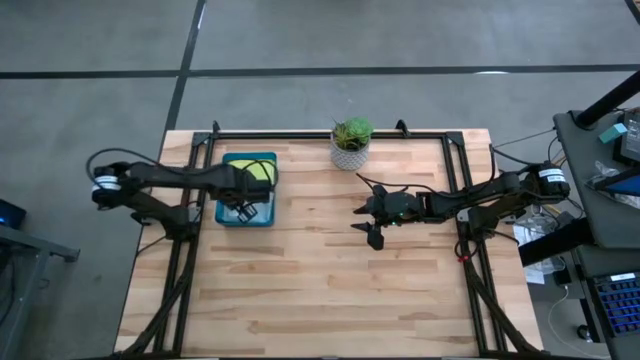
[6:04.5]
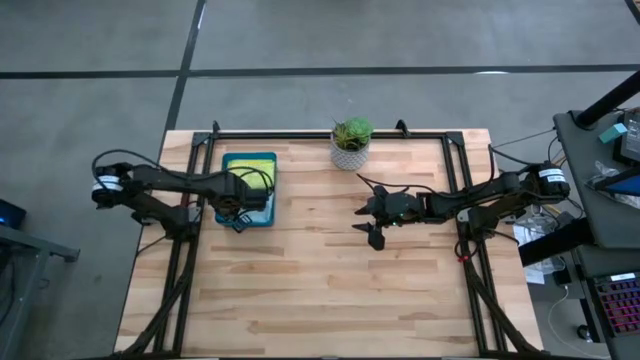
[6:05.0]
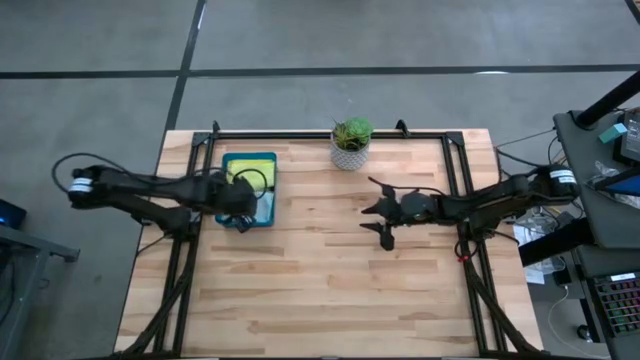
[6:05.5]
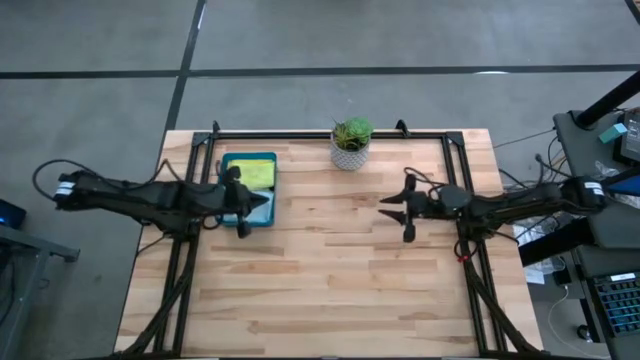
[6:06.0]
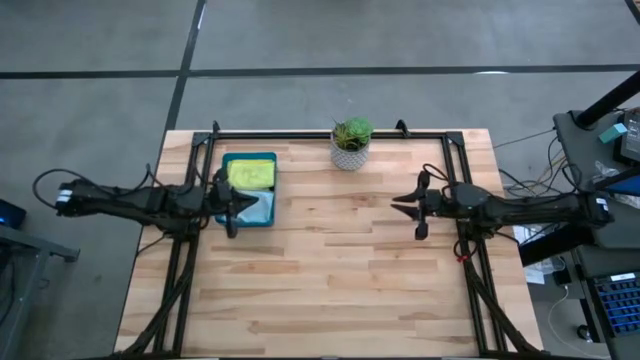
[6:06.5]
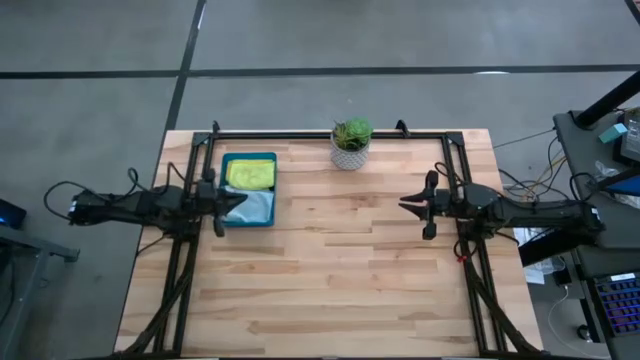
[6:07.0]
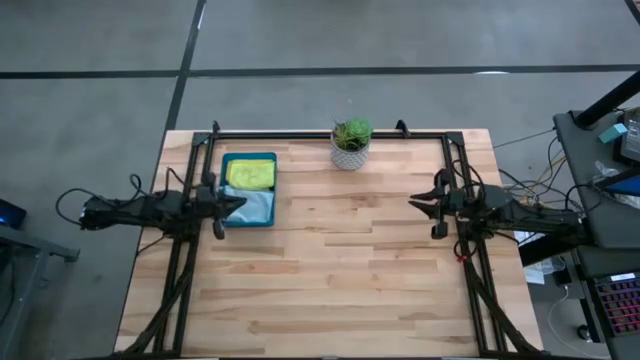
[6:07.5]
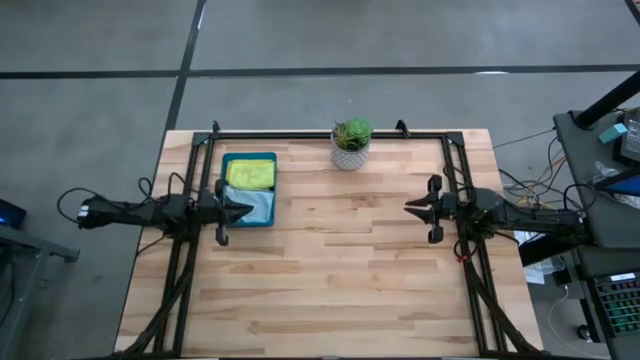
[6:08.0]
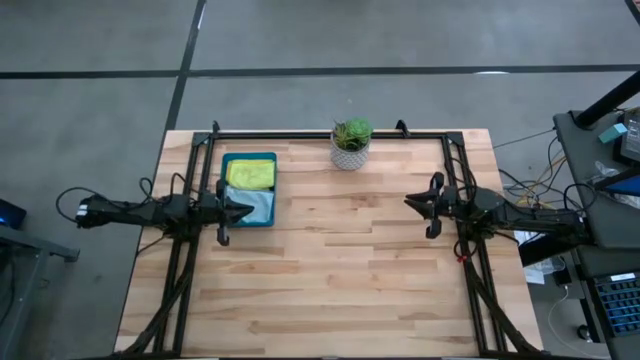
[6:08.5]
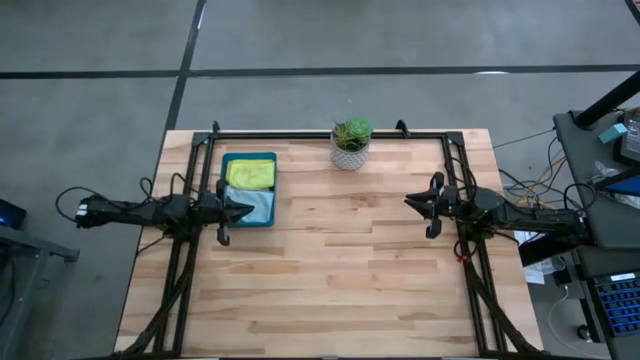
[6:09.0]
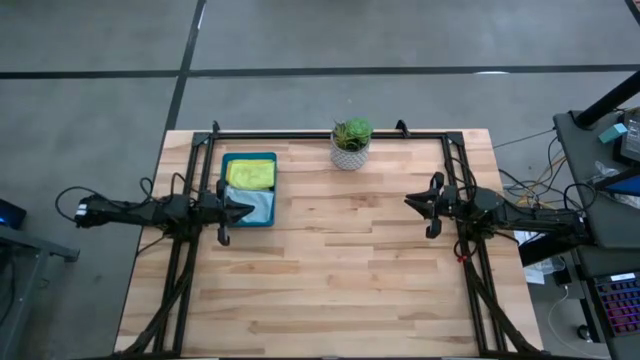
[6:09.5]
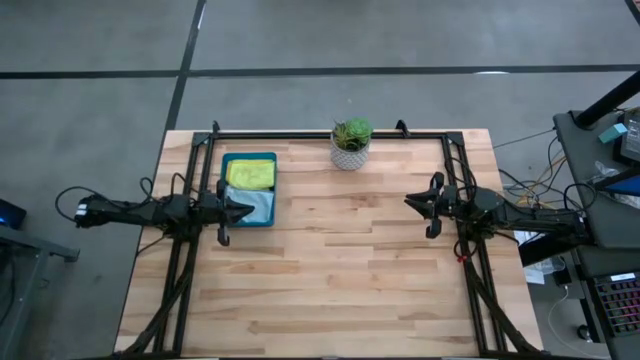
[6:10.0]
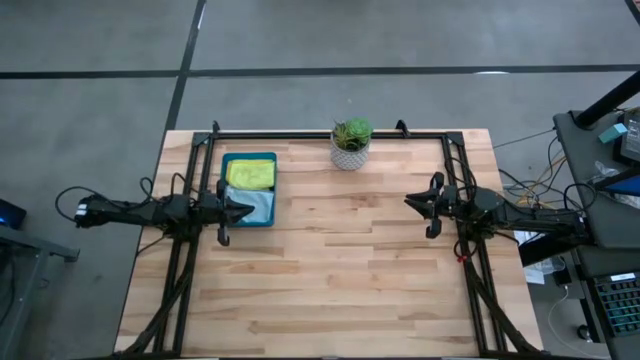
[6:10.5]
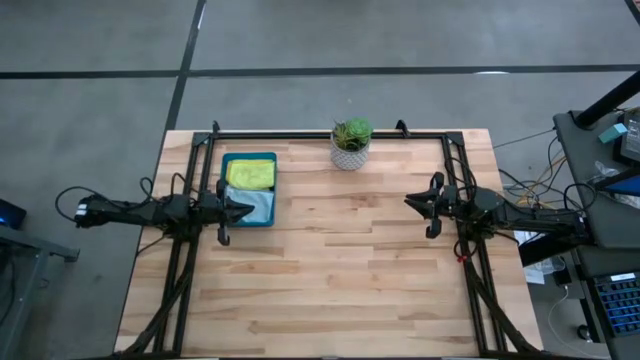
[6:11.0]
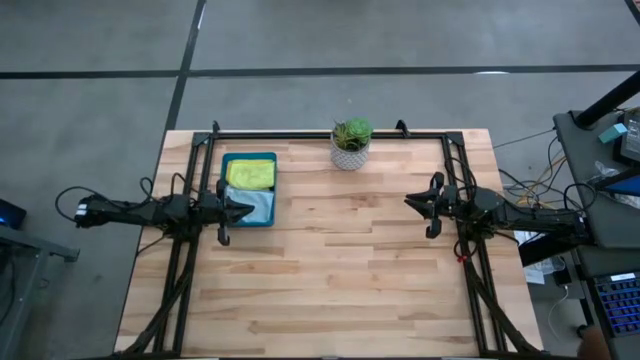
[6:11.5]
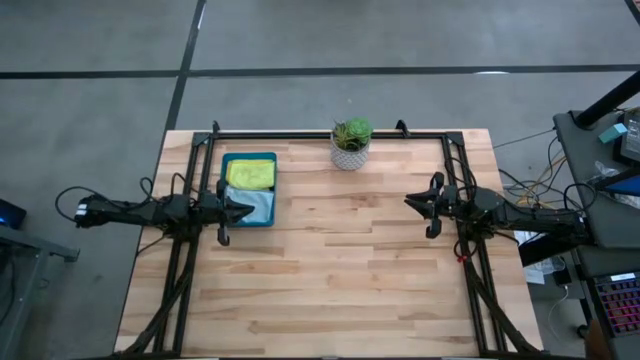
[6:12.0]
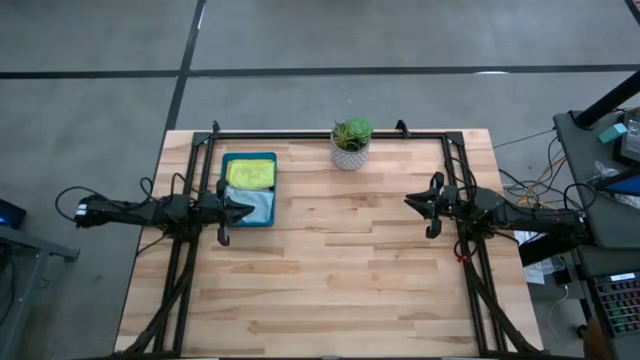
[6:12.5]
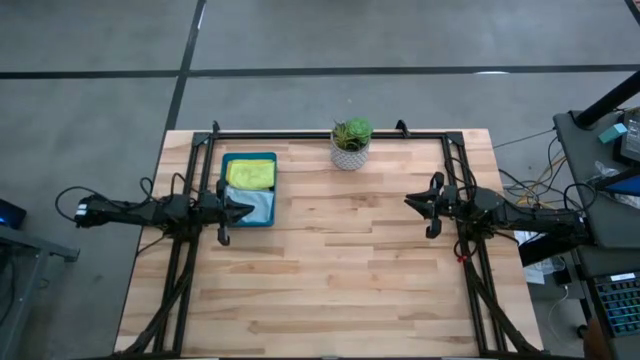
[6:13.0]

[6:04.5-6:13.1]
Task: Fold microfiber towels
Return to Home Position

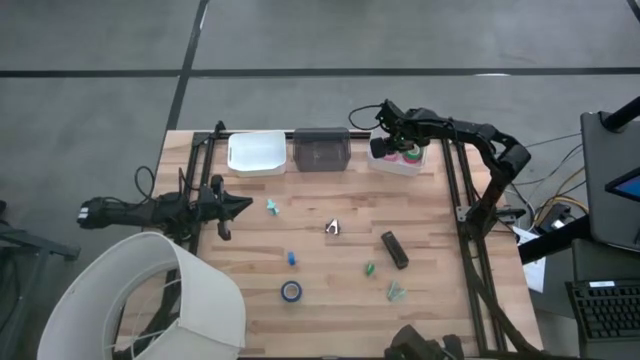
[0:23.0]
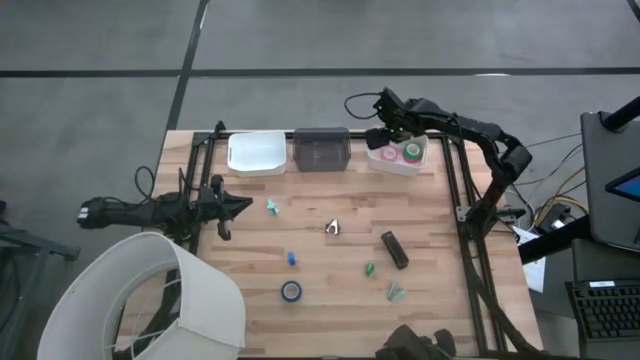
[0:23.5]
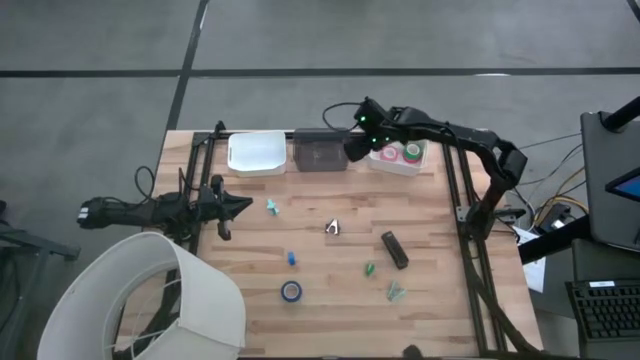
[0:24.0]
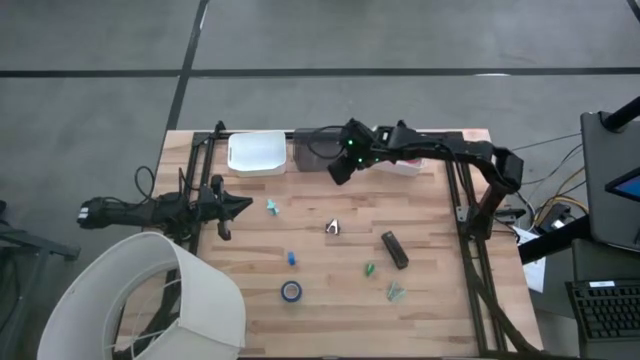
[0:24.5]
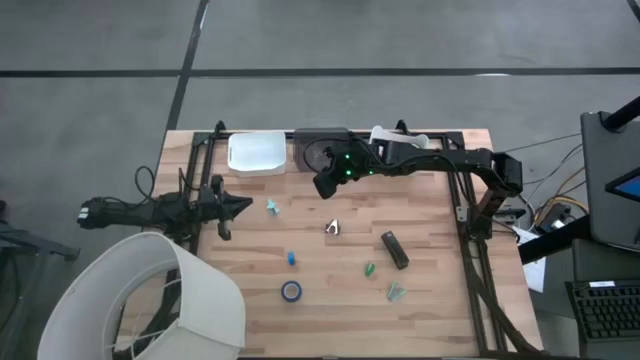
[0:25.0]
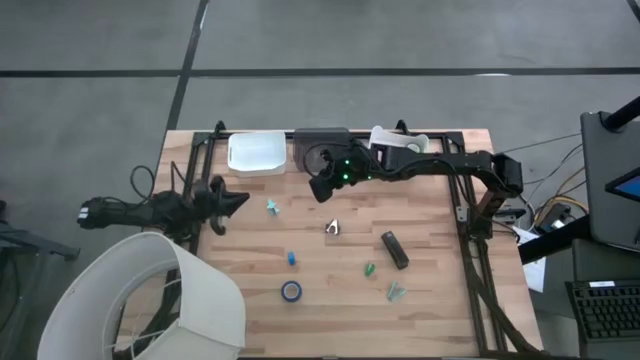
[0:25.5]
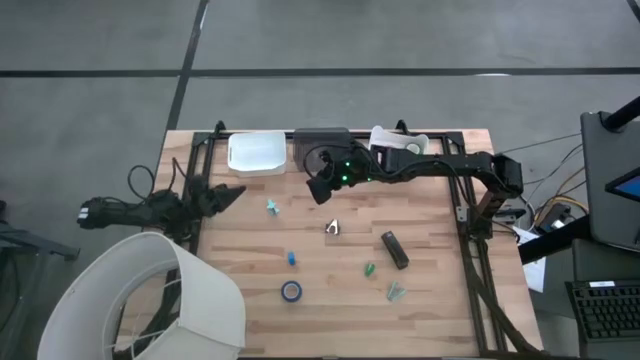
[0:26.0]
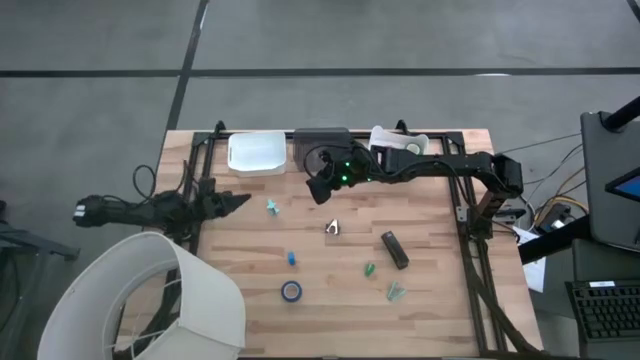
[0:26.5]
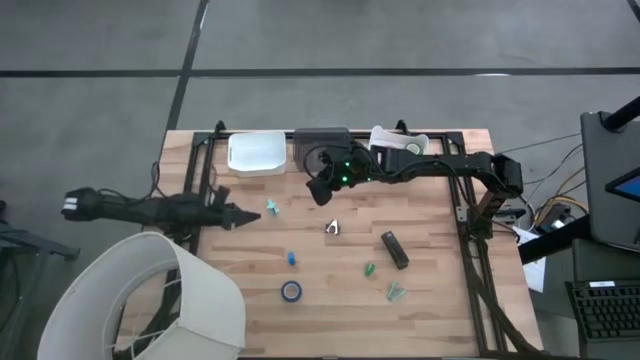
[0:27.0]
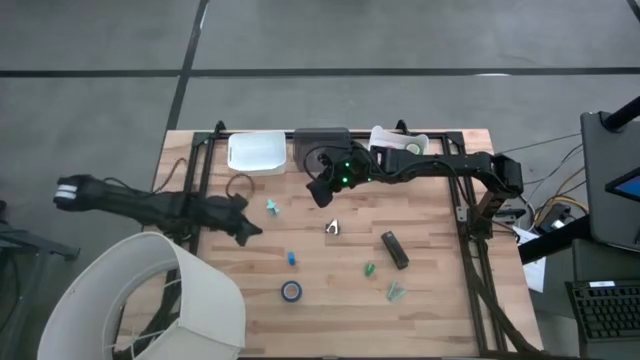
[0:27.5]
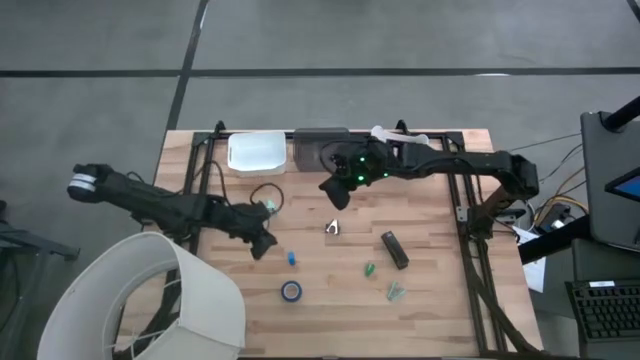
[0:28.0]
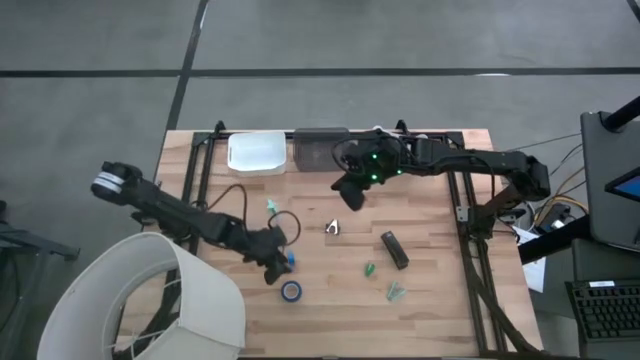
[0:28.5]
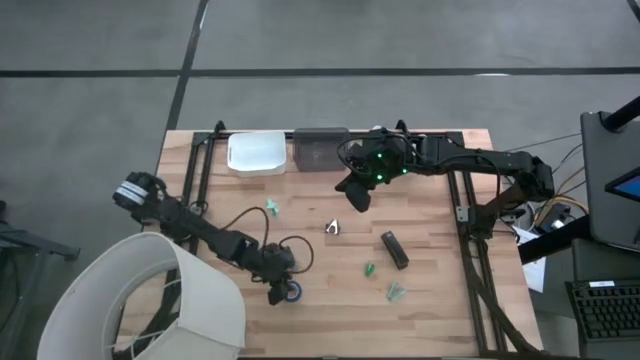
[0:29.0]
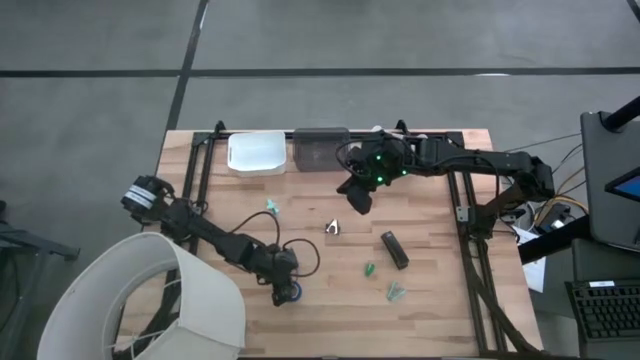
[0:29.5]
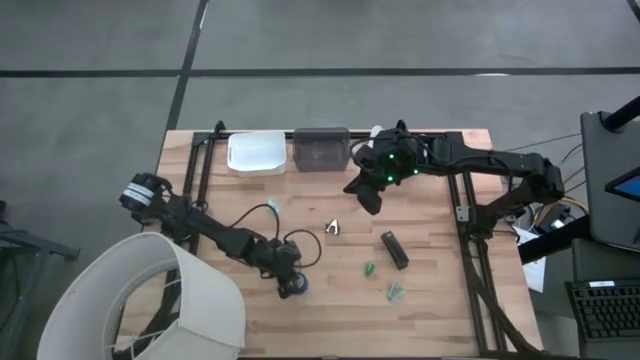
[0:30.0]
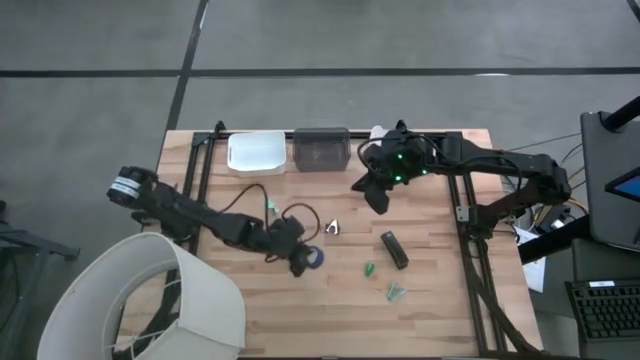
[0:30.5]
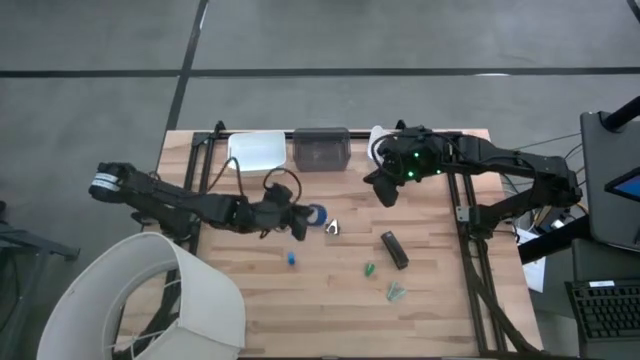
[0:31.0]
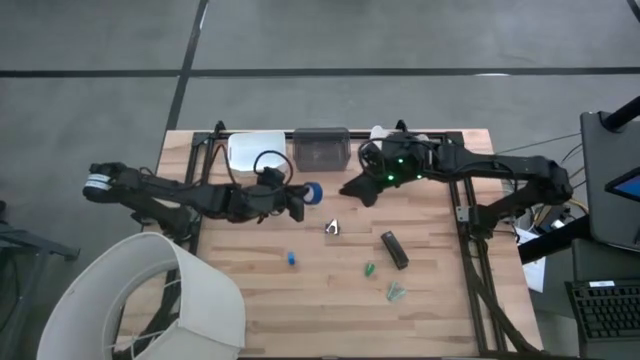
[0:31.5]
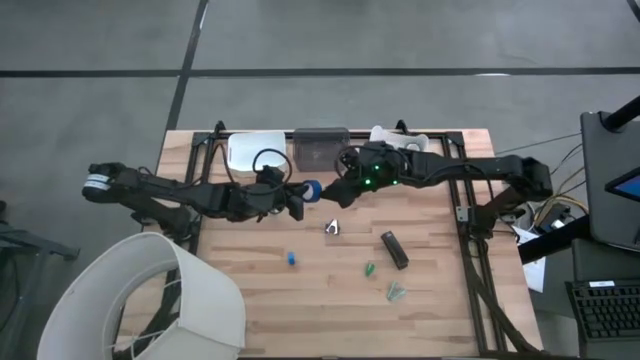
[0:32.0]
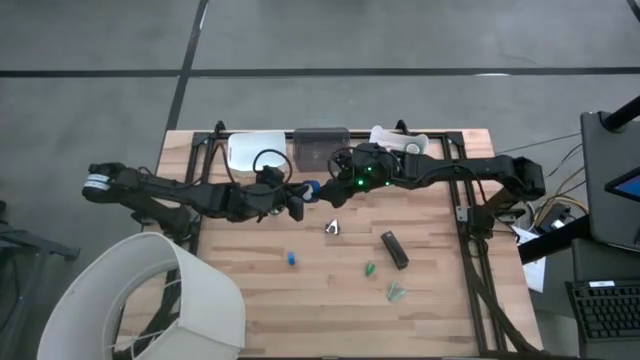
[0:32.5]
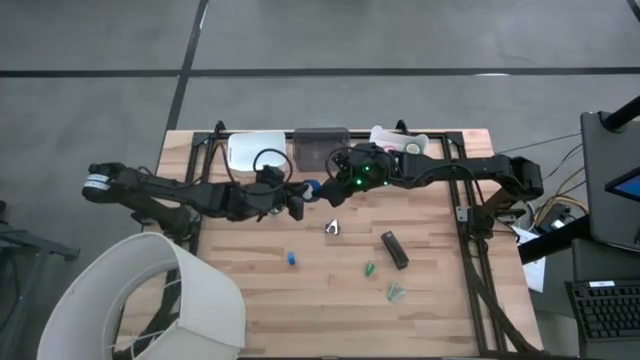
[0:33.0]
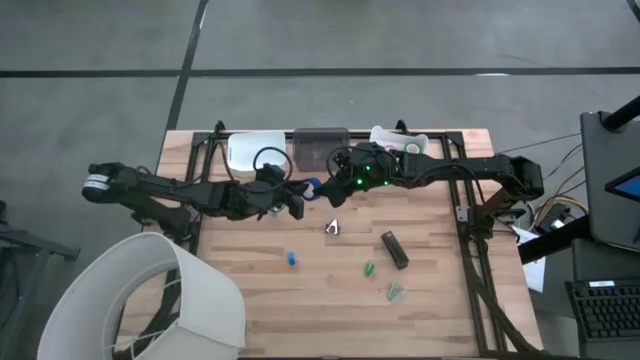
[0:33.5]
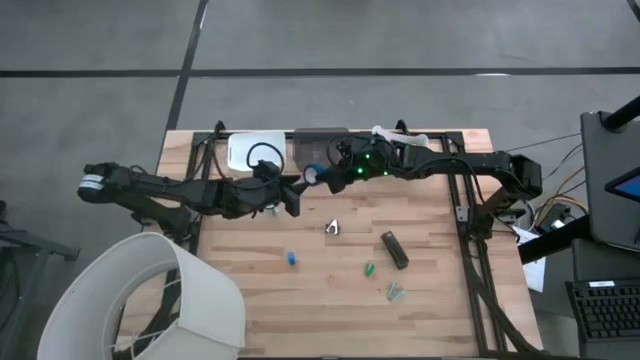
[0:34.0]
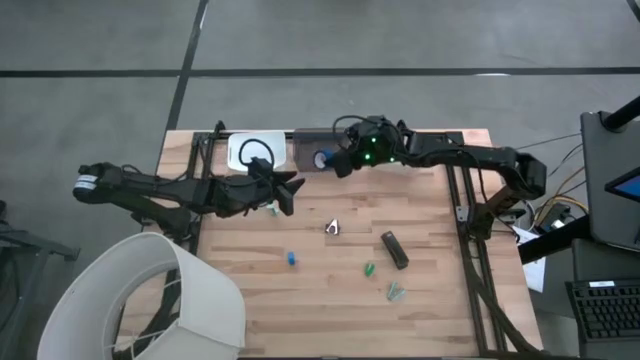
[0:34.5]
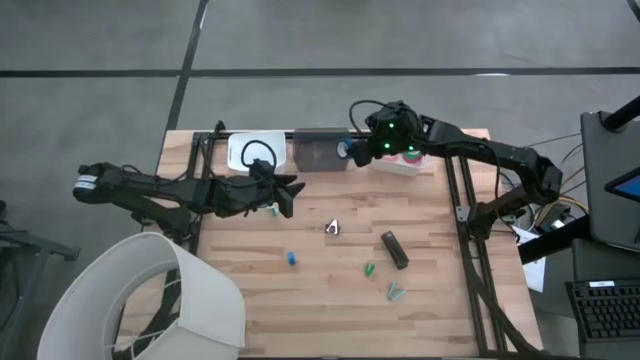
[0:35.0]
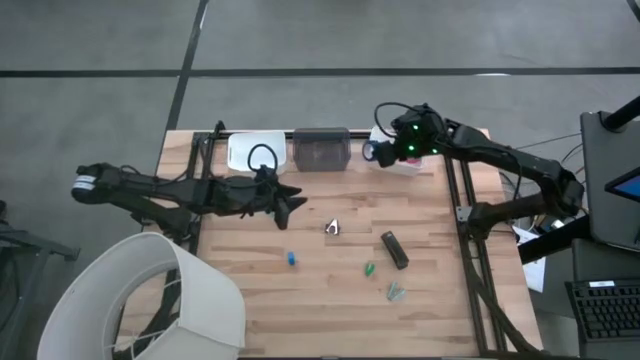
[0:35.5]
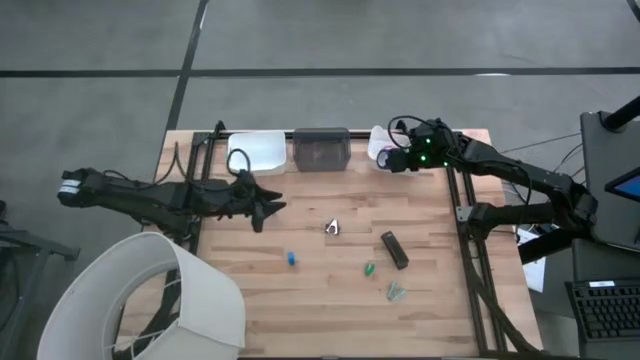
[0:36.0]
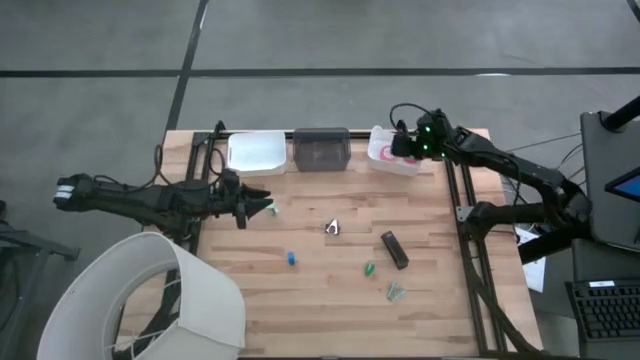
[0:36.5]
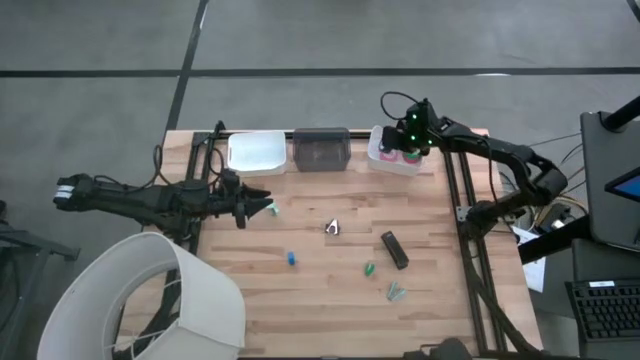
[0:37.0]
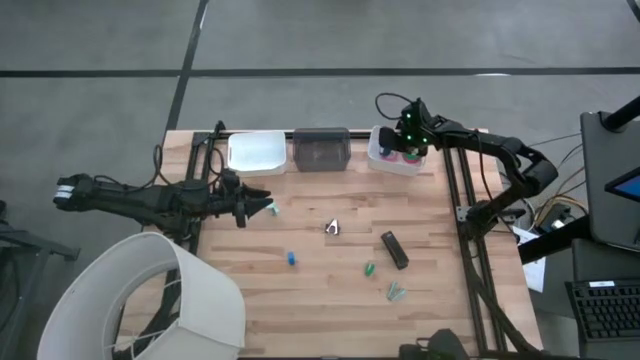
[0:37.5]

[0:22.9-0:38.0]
Task: Pick and place Stapler, Stapler remover, tape
Put the blue tape into the right white bin
